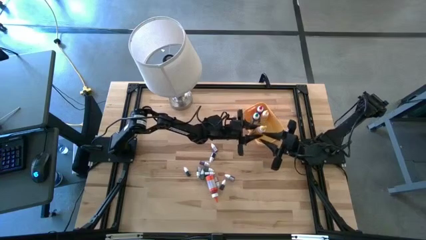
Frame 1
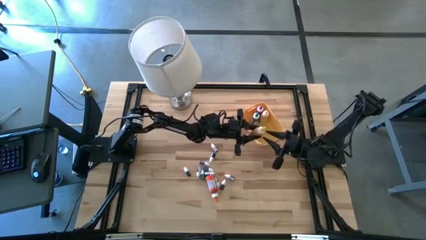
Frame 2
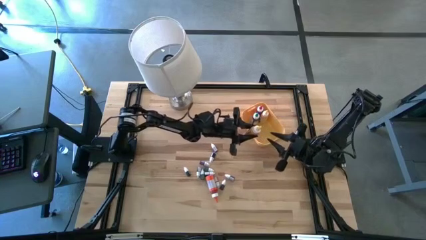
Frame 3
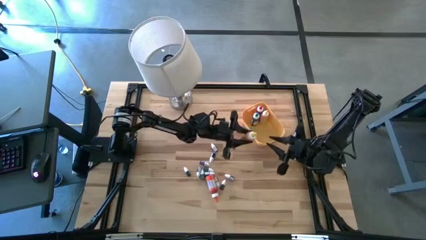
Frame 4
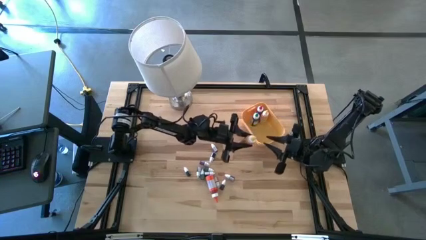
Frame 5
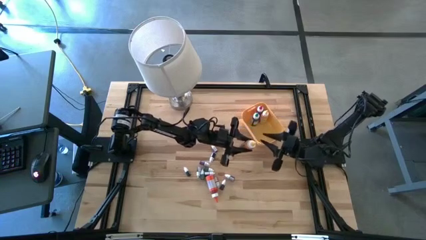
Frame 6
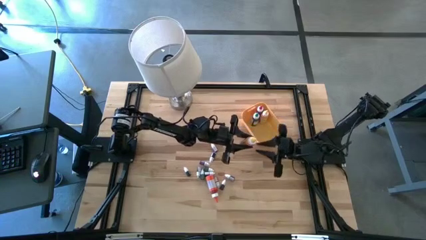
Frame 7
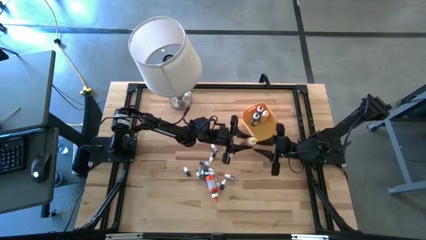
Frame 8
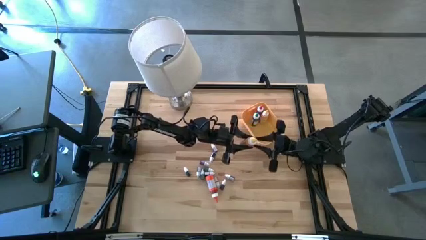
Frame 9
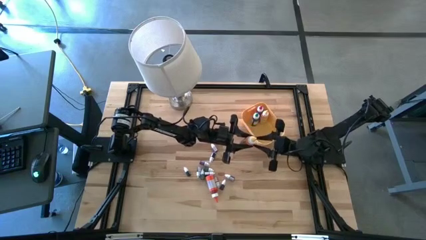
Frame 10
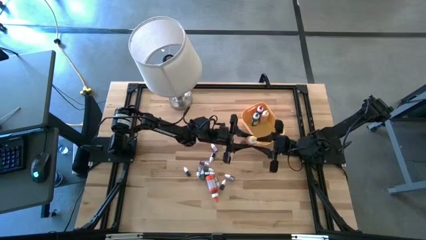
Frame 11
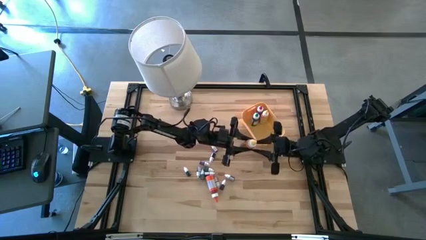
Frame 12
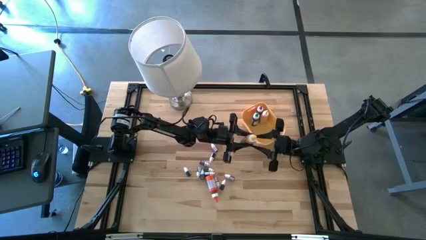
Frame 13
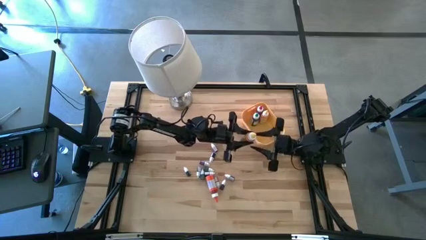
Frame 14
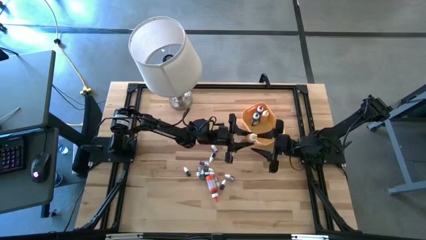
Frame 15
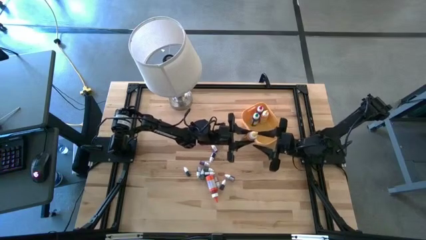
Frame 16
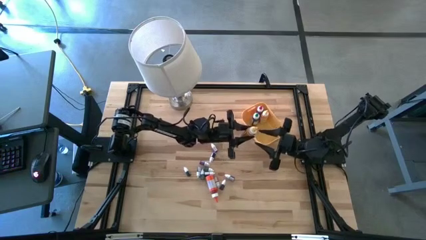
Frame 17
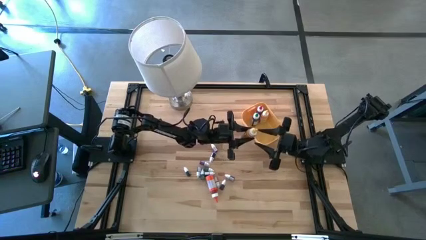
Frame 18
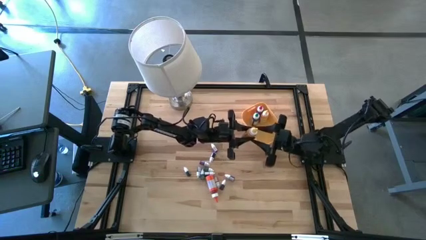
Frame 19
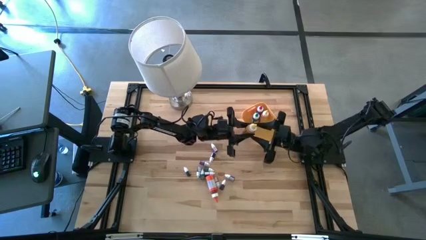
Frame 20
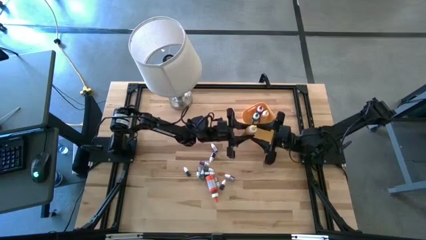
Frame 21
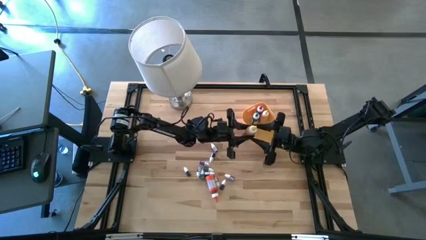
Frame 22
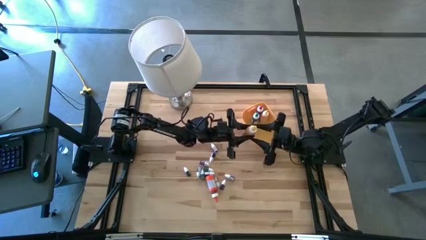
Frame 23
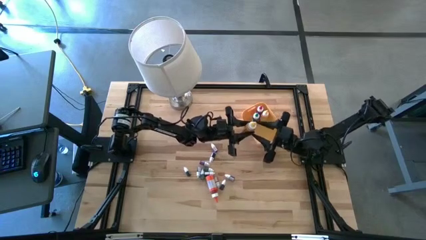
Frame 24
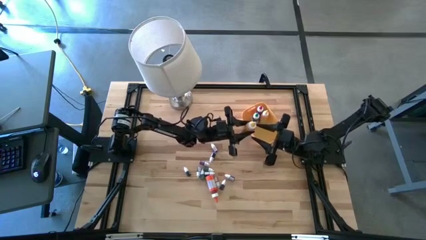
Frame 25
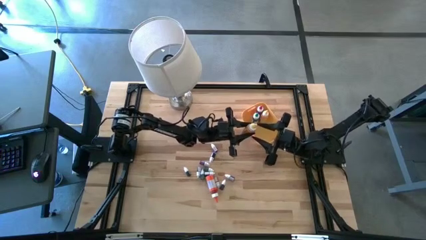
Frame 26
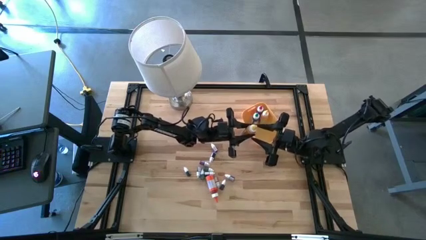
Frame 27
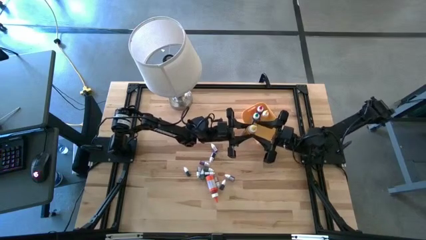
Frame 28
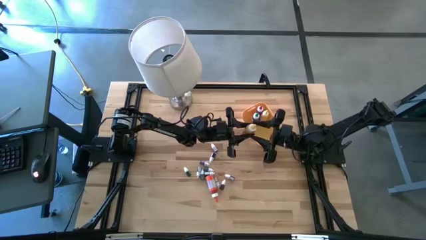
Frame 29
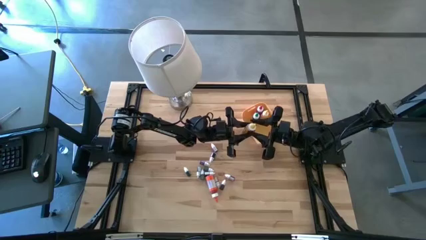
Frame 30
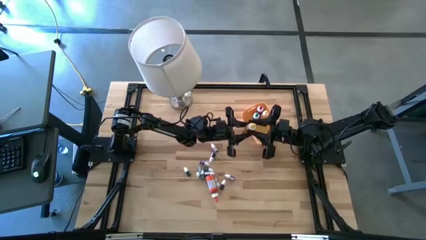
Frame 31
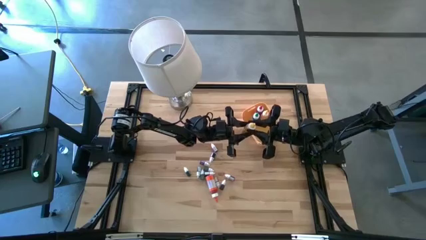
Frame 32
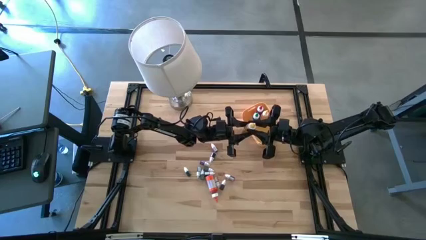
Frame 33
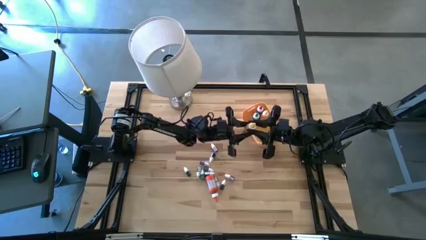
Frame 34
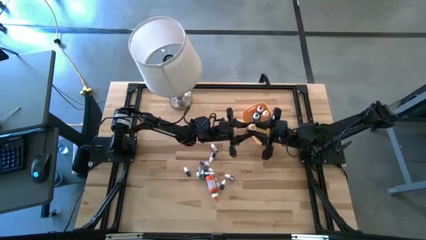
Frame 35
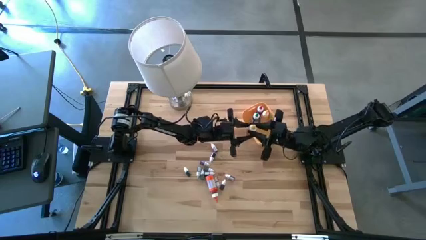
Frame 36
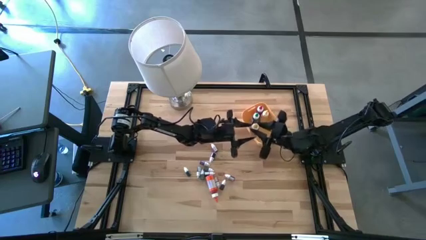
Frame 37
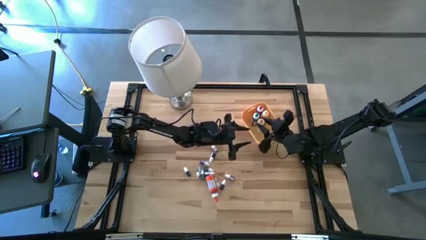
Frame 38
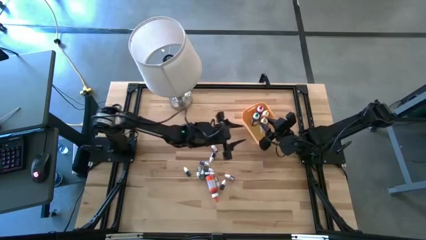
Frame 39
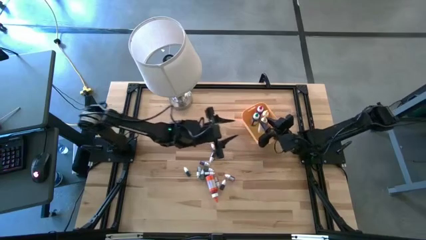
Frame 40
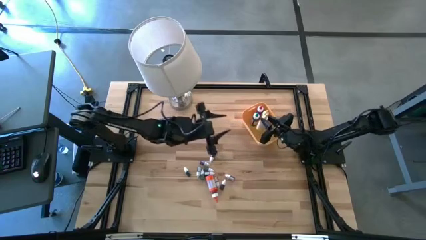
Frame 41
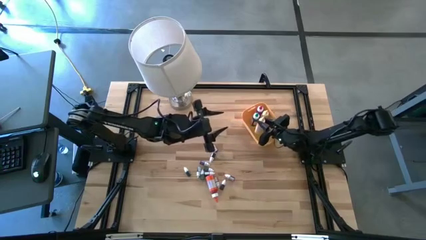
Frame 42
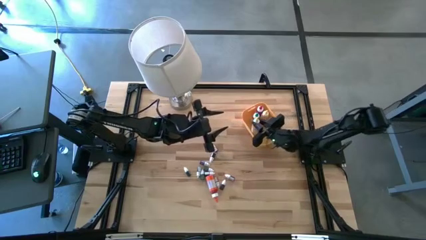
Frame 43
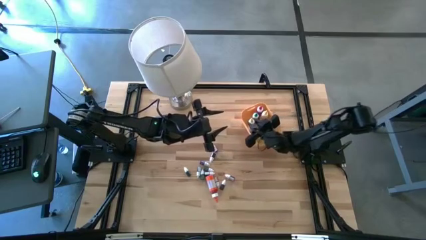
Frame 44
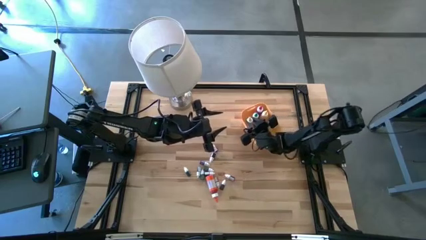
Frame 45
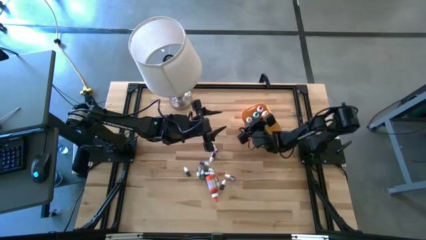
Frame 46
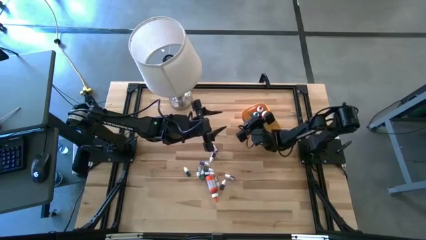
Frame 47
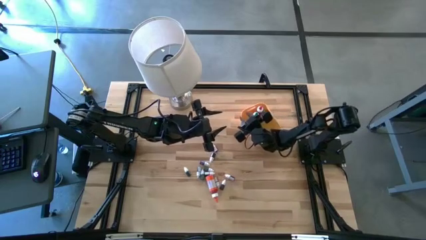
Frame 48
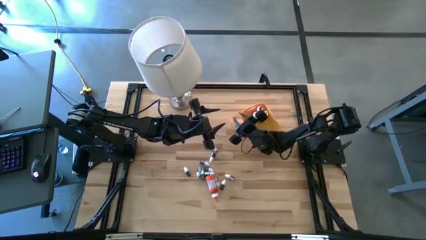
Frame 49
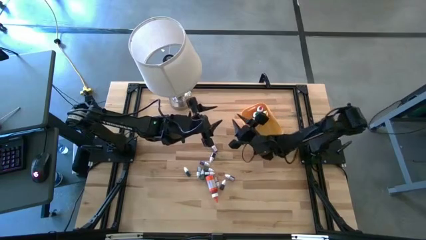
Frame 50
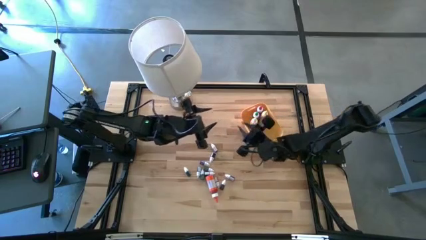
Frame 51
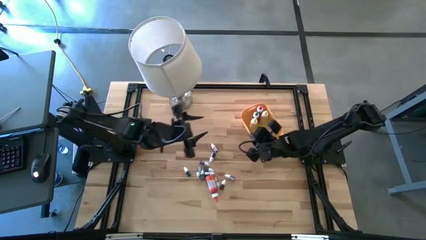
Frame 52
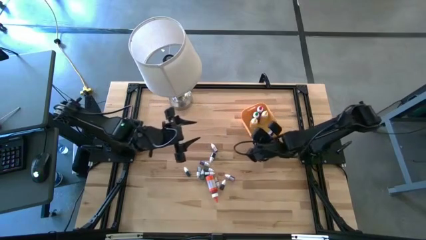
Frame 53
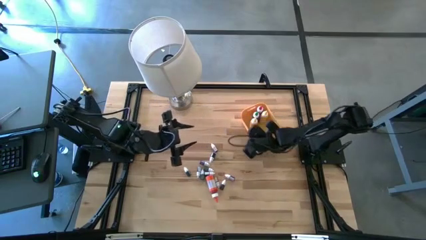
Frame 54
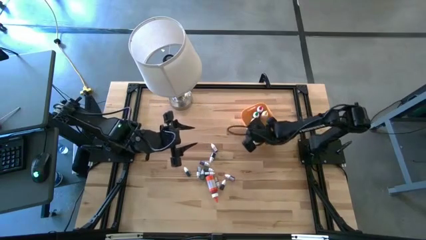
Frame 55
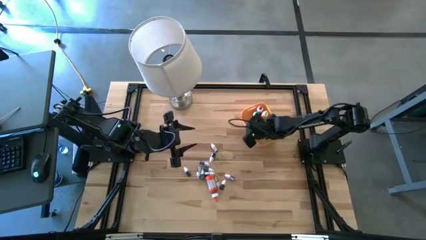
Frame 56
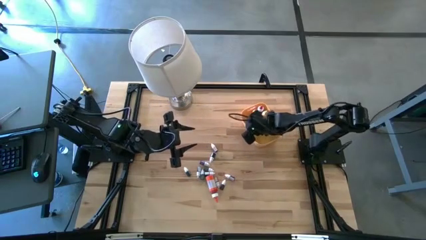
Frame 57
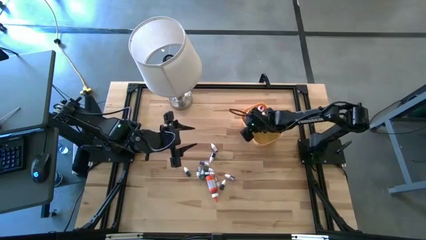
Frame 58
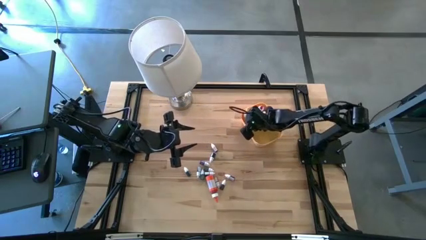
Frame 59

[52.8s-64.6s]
Task: Pick & Place food coloring
Put the large yellow food coloring bottle into the yellow bin
